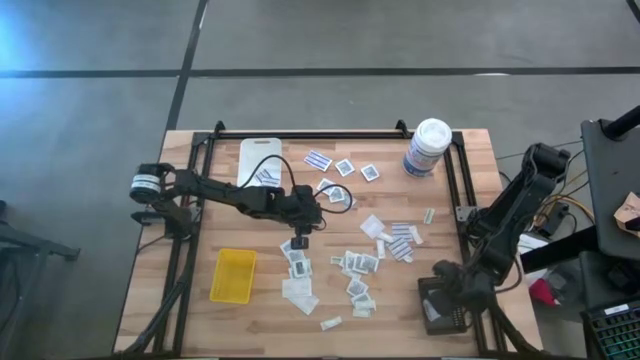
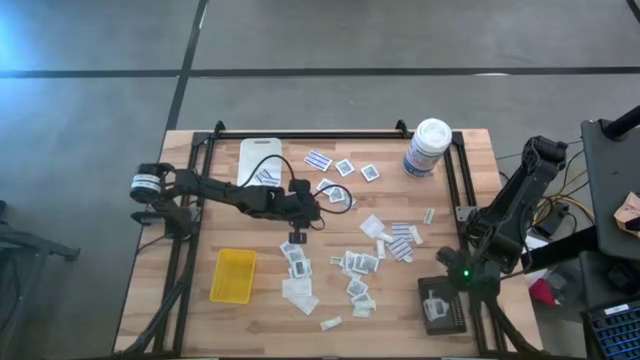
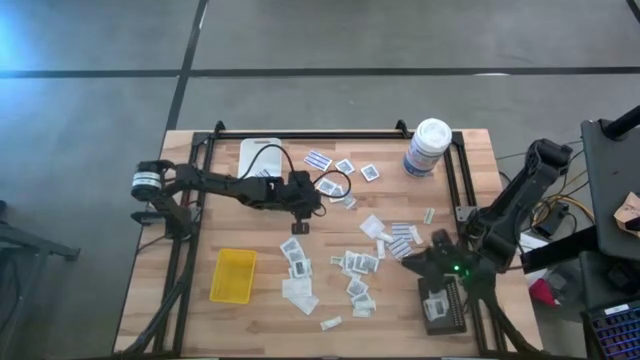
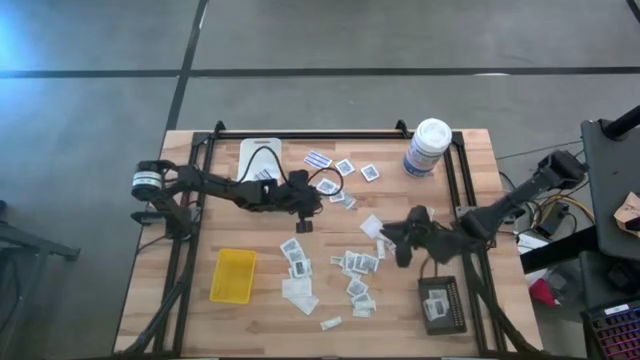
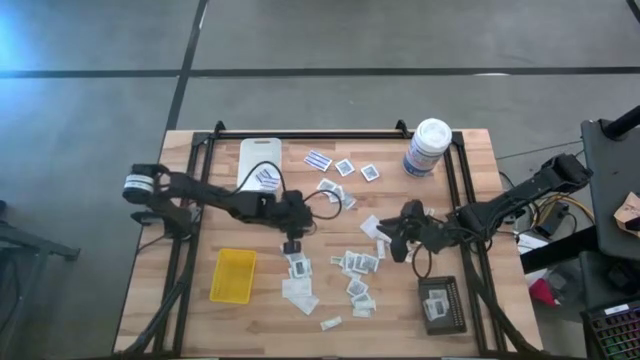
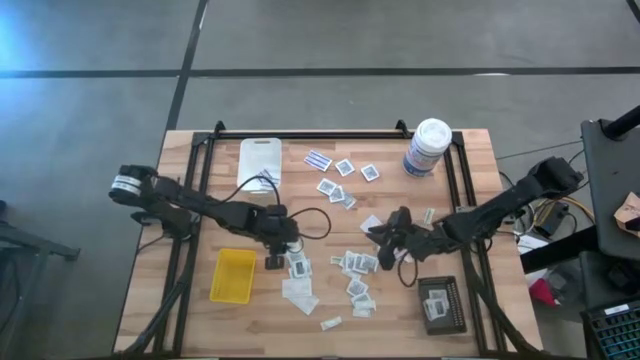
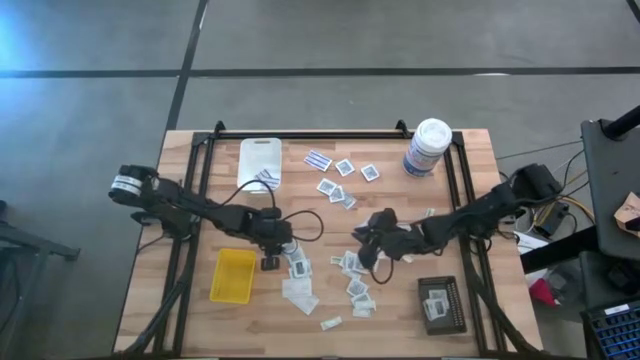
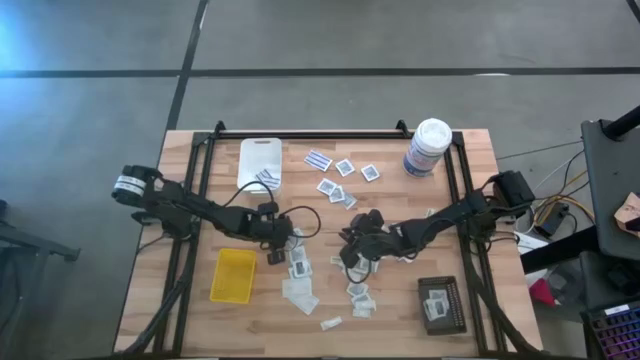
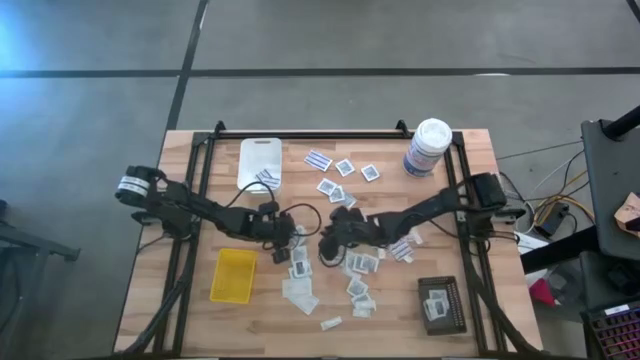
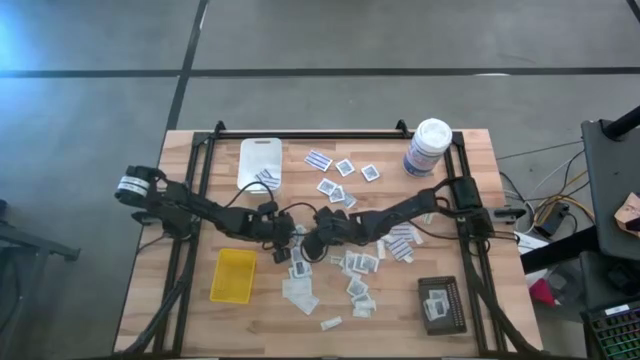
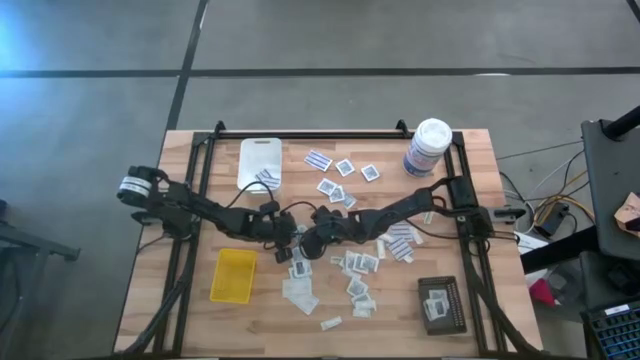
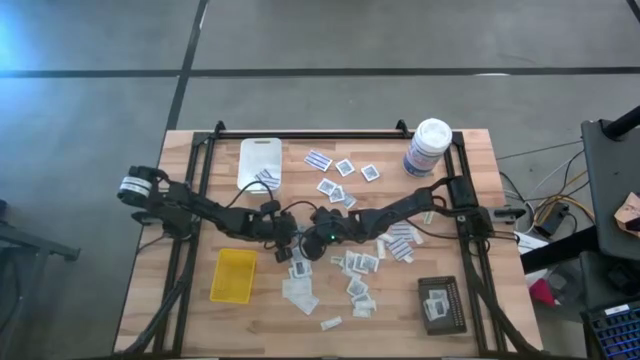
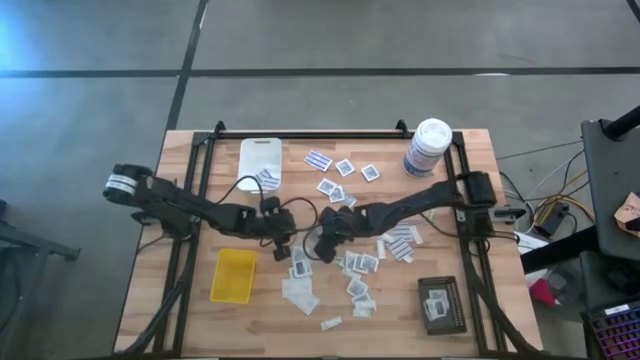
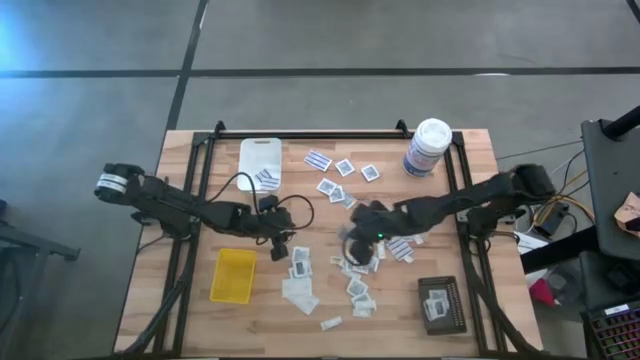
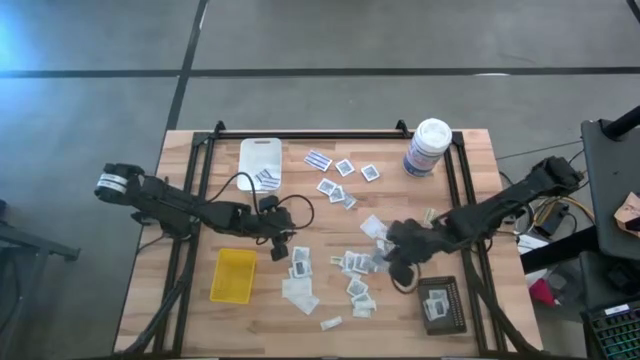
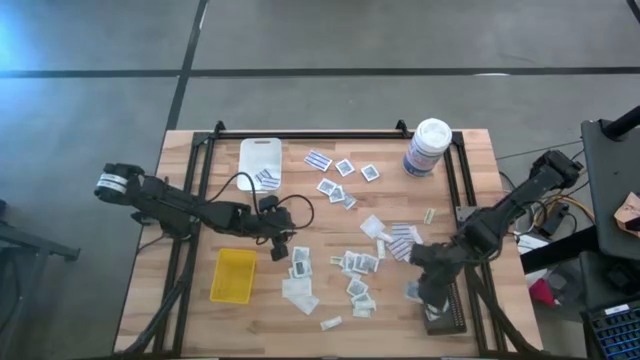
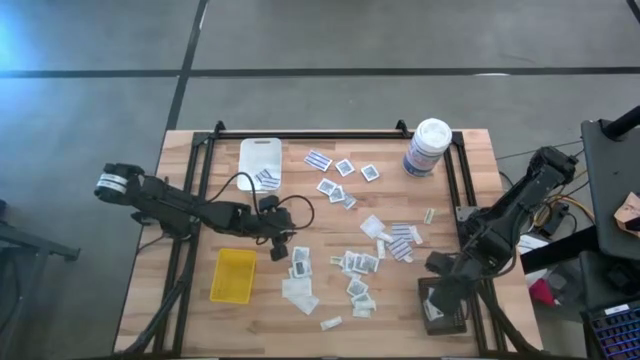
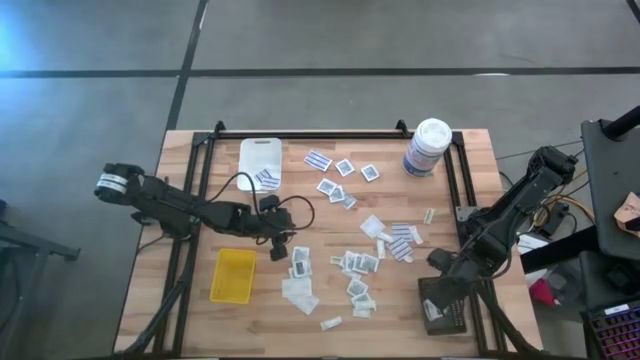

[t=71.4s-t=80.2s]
Task: Pick & Place First Aid Supplies
Put the towelette pack into the black bin

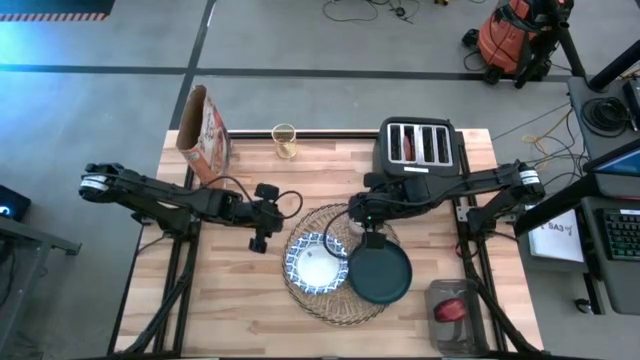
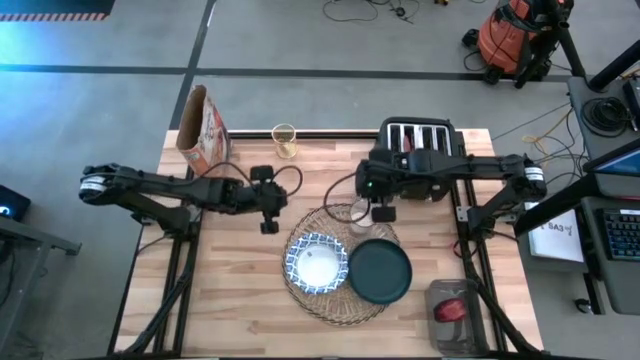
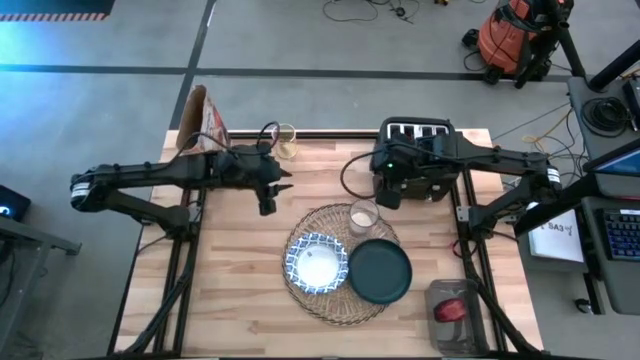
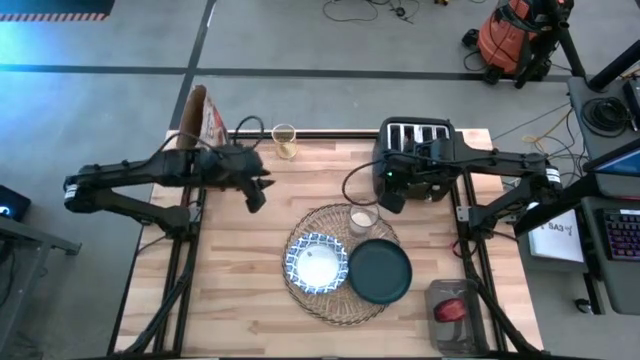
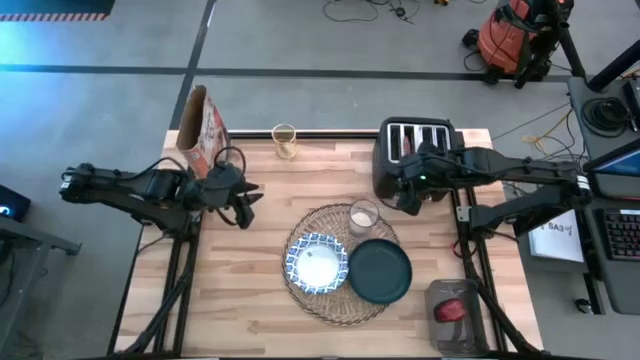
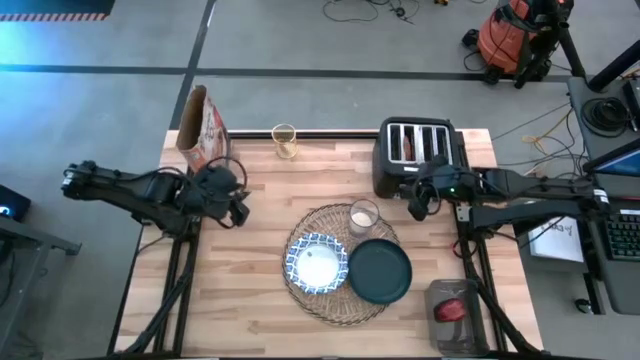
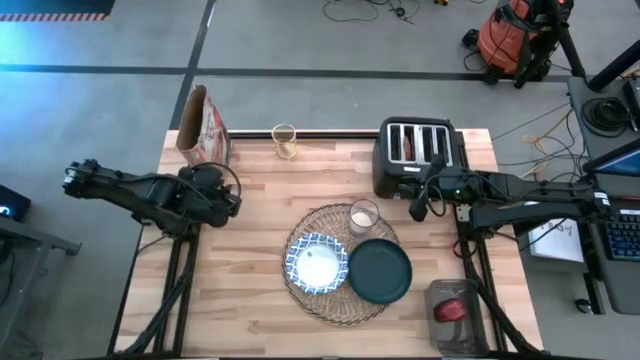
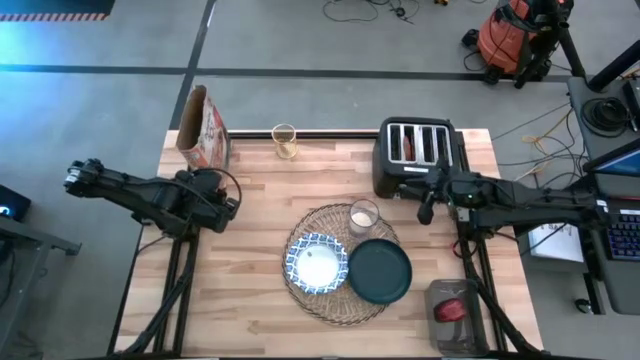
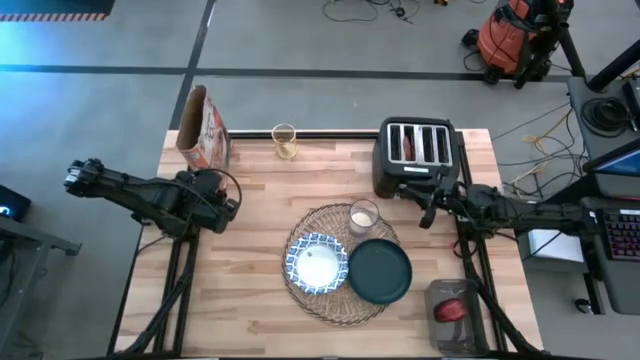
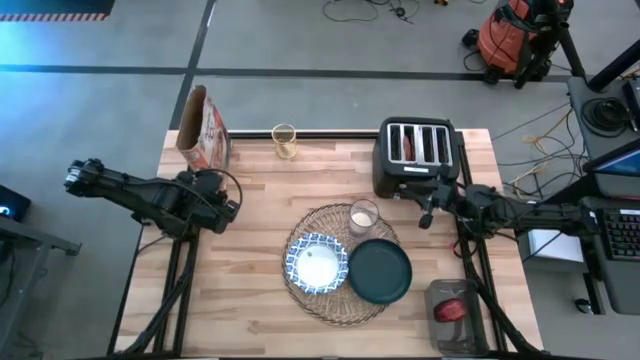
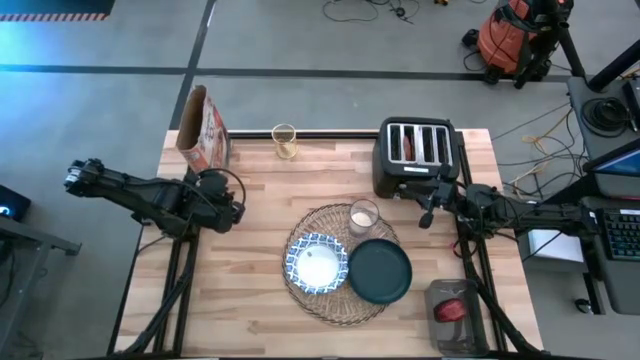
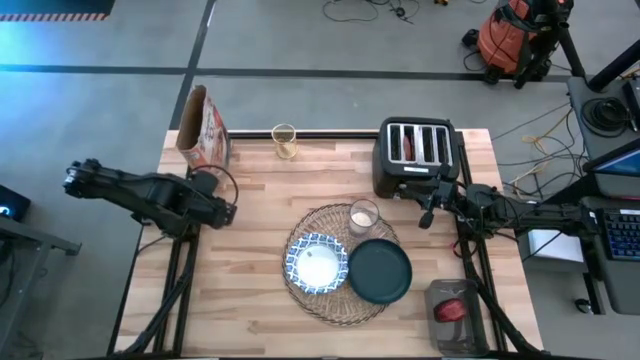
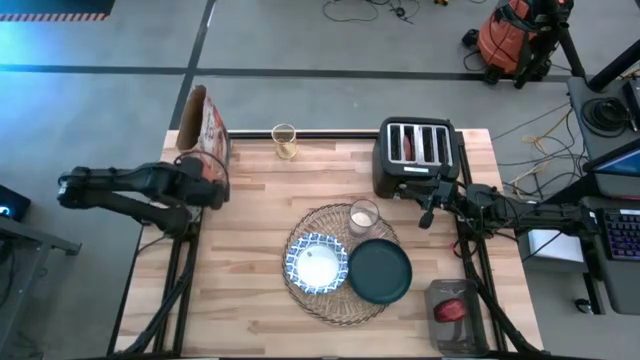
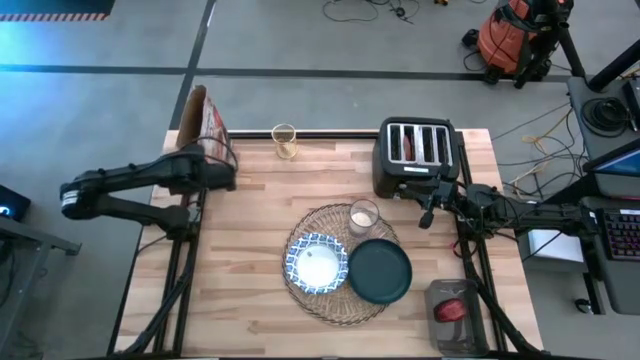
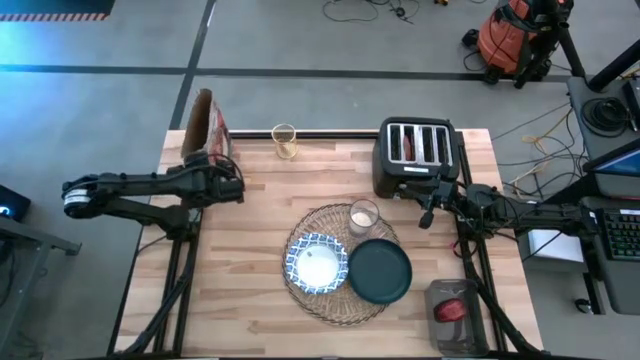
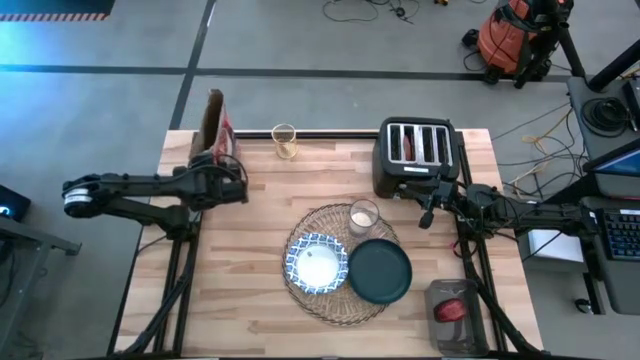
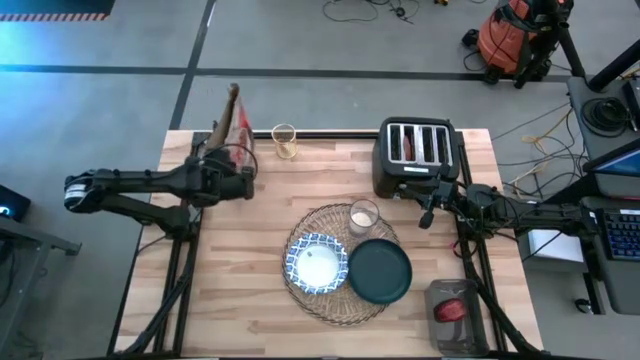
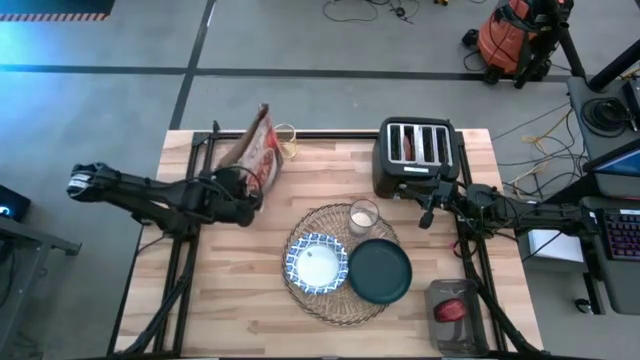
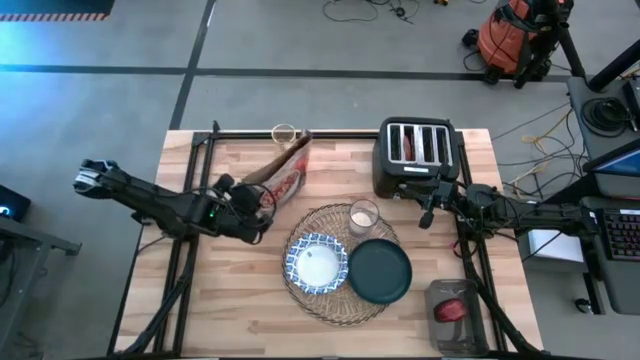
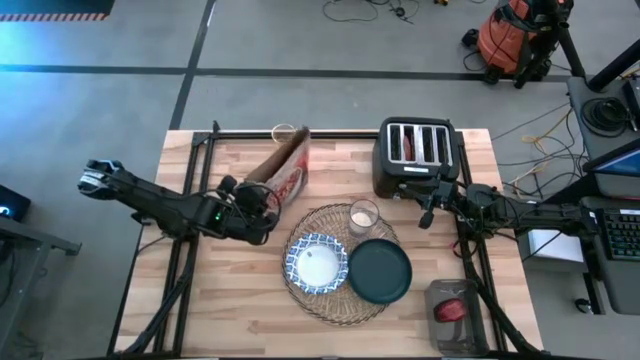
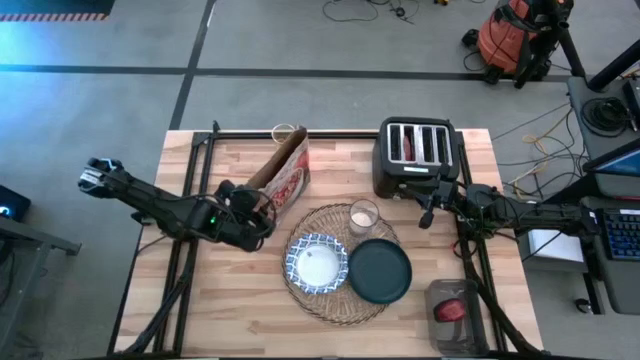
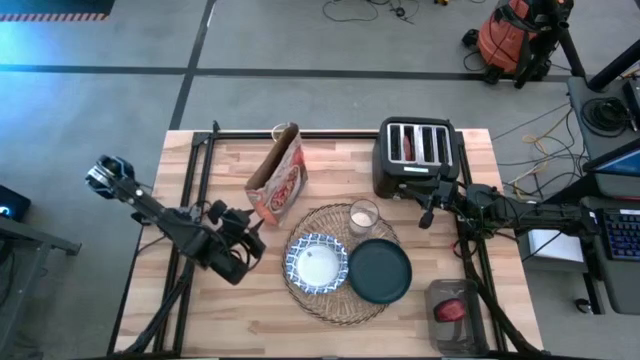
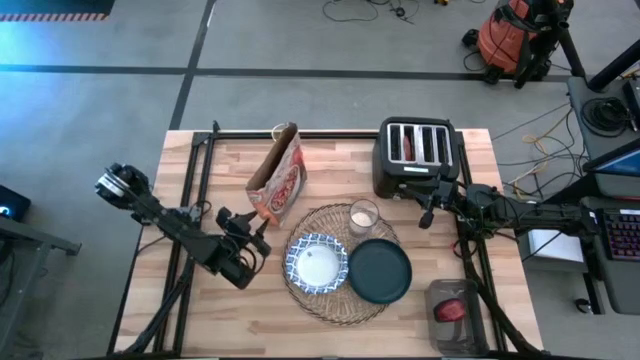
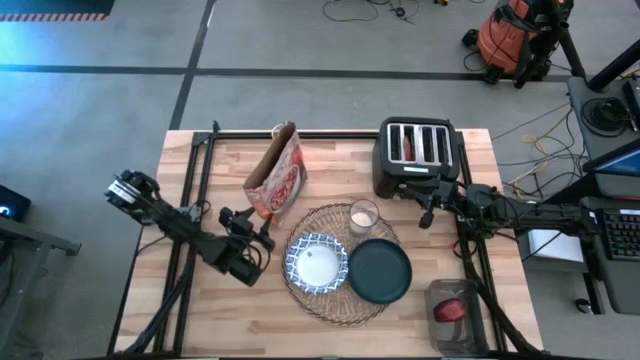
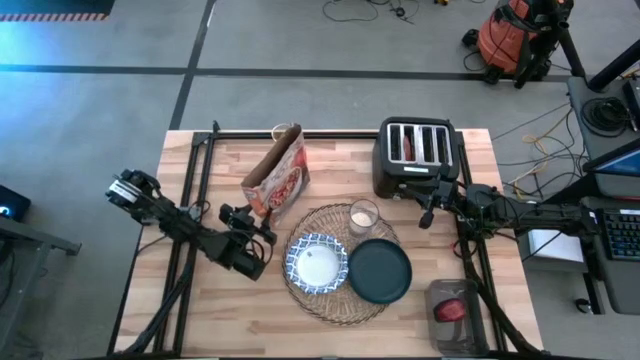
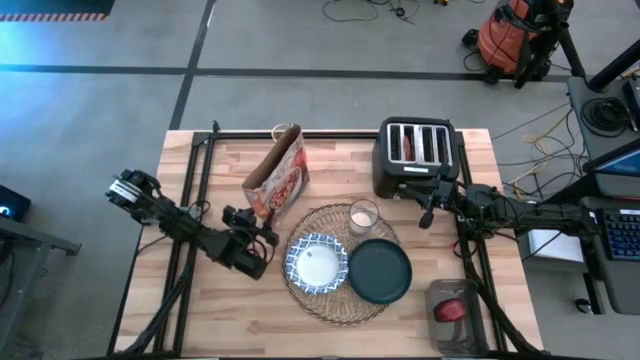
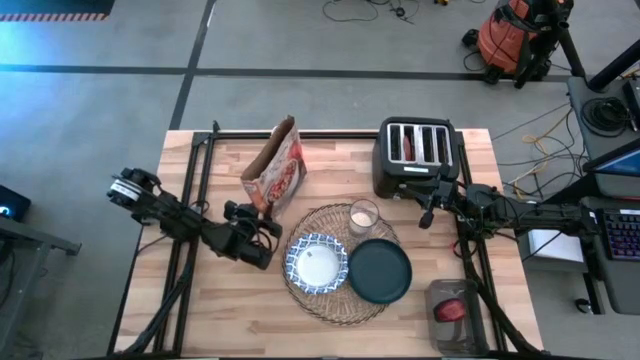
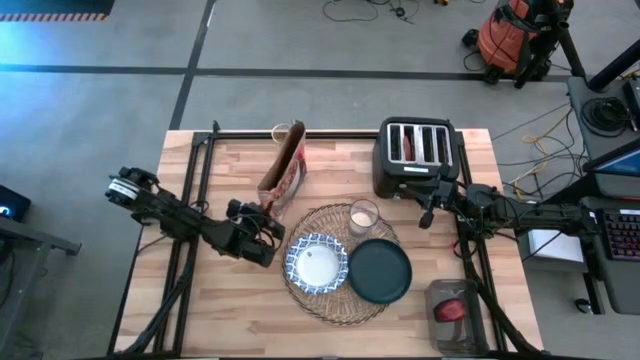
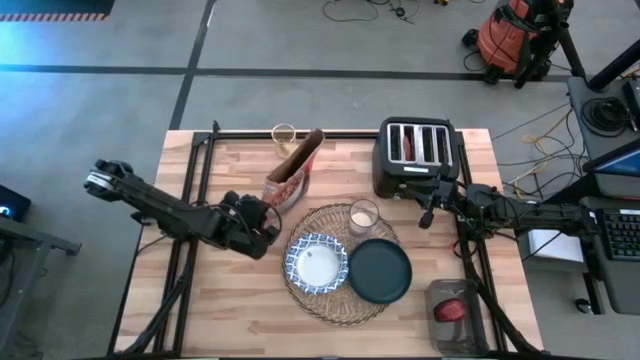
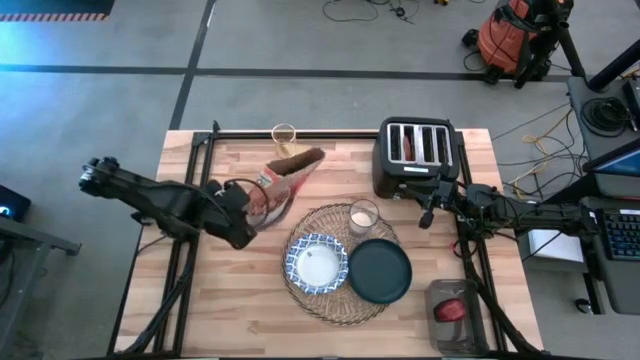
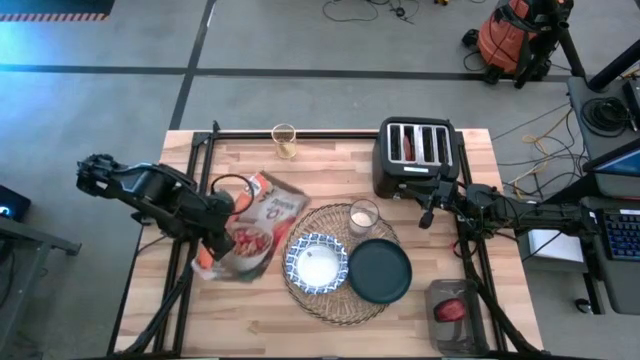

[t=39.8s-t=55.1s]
Task: Arrange a breakfast setting
Pour the brown cereal from the orange cereal box into the white patterned bowl
